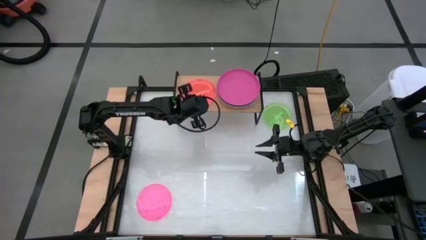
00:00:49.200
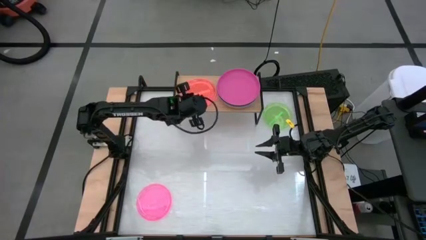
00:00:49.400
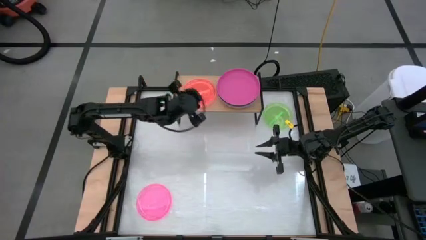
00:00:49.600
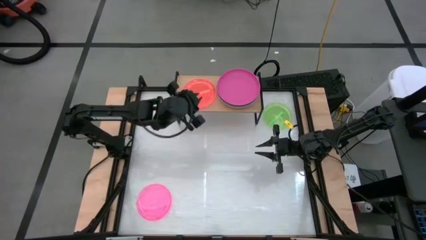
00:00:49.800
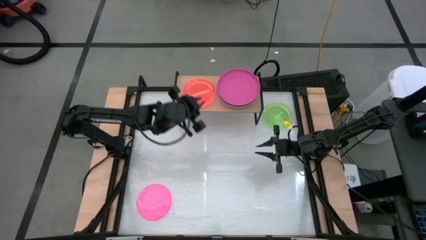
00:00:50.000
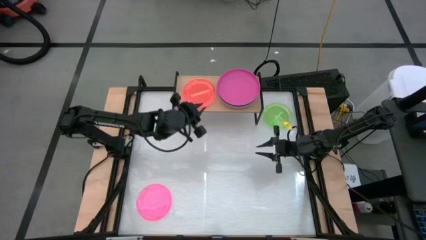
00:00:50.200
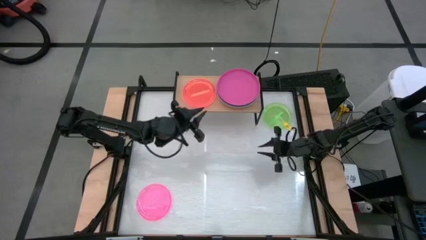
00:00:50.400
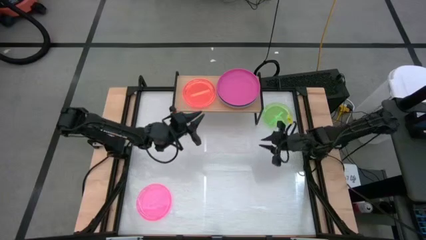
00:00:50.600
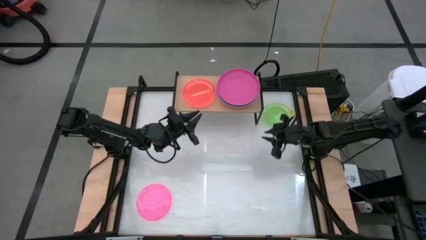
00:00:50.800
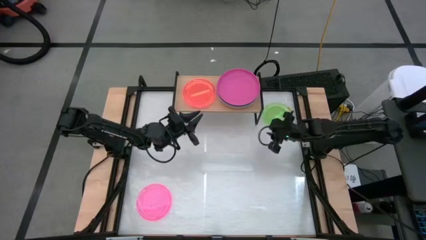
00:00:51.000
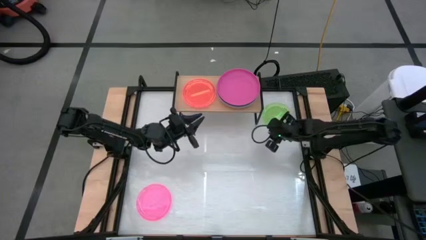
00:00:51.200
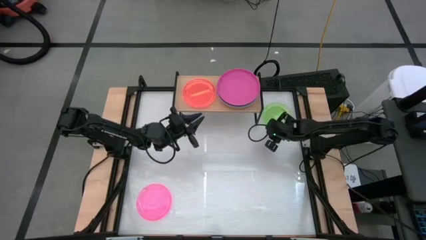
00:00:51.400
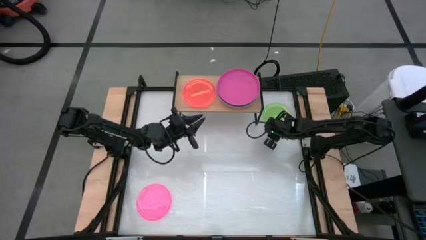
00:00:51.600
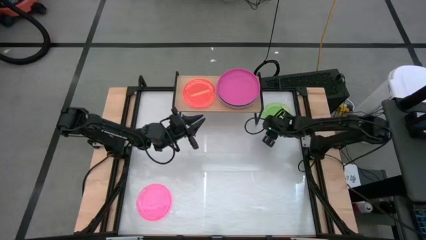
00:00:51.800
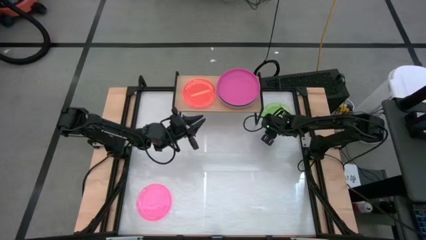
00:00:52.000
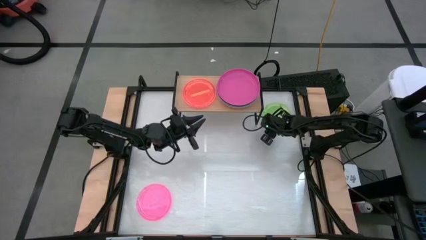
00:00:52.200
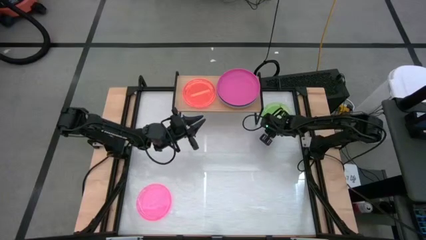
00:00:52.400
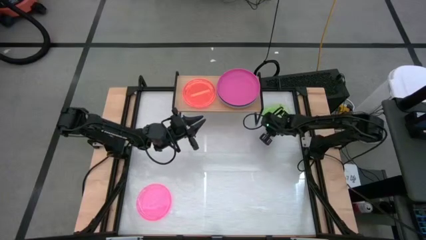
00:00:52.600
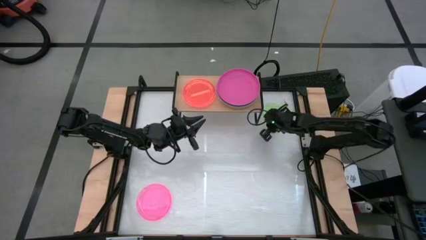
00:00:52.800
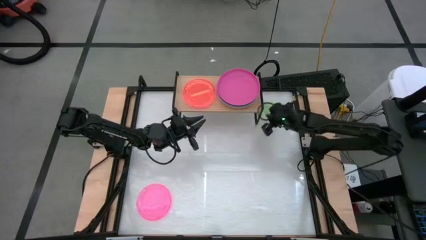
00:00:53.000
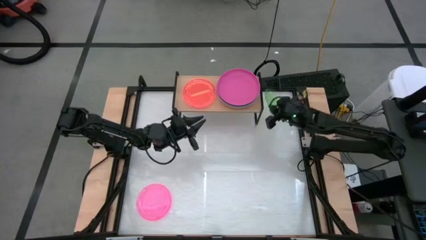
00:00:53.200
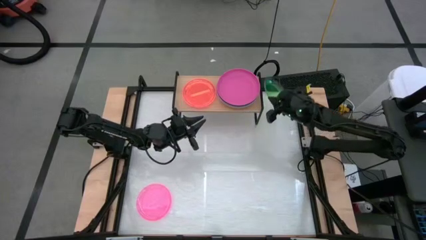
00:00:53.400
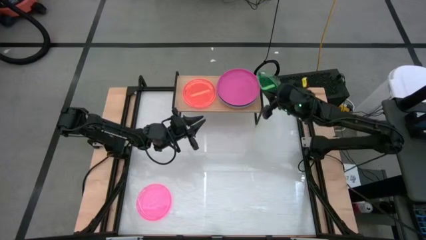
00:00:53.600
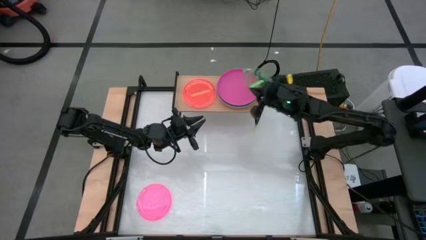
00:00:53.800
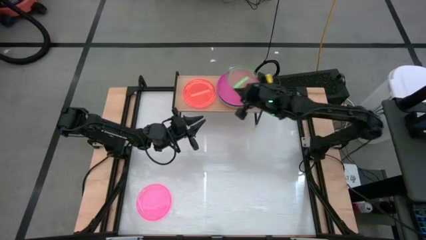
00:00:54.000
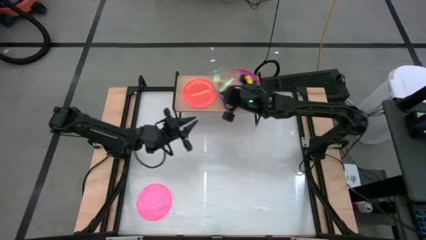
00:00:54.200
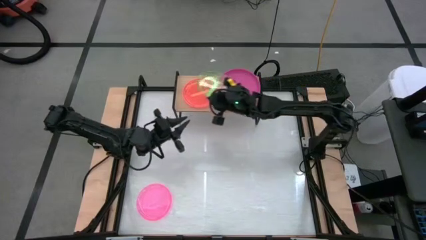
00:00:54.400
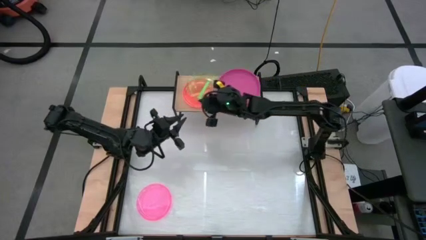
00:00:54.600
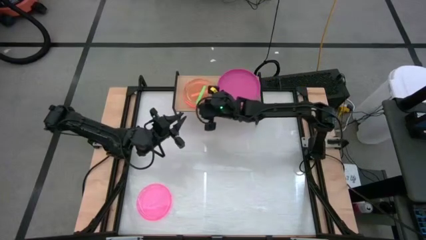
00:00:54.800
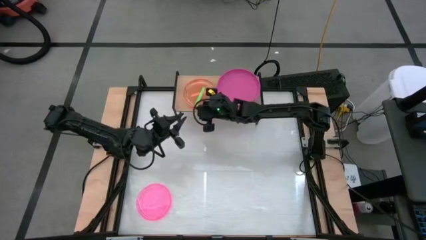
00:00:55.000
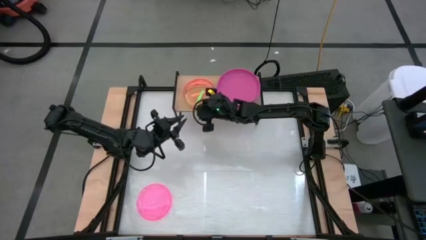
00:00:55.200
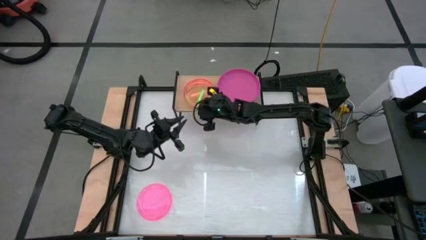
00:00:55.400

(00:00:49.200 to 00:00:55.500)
Task: Place and stack plates onto a shelf
Stack the small green plate on top of the small orange plate on the shelf

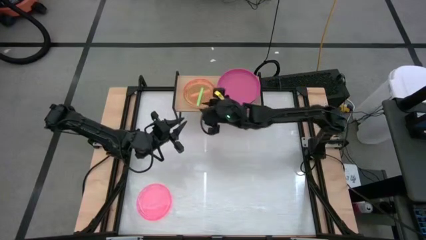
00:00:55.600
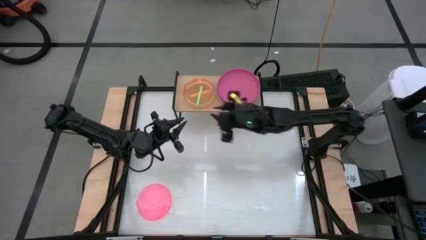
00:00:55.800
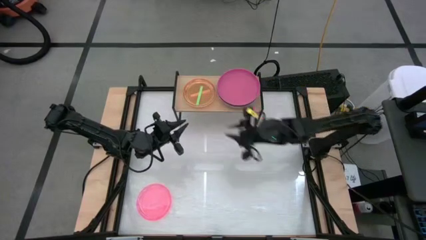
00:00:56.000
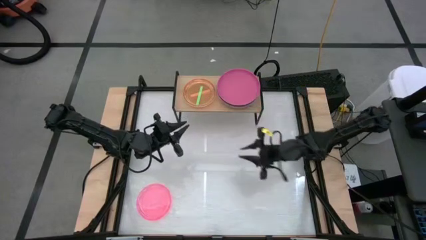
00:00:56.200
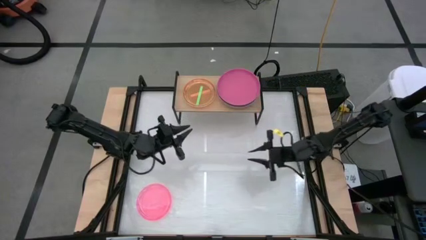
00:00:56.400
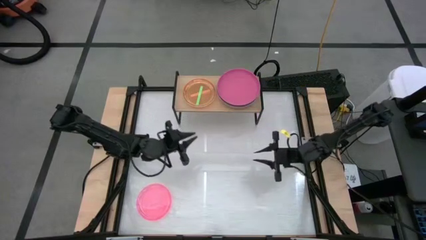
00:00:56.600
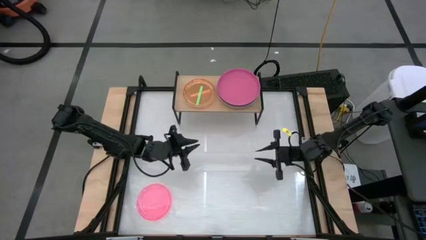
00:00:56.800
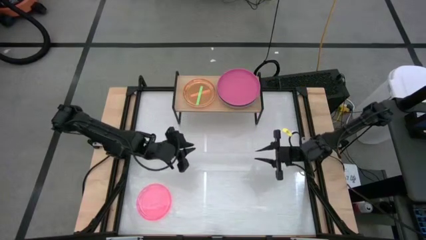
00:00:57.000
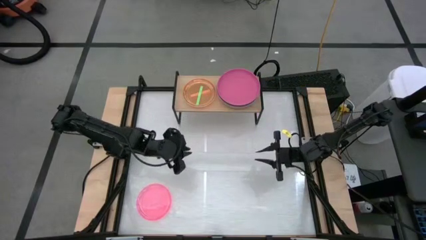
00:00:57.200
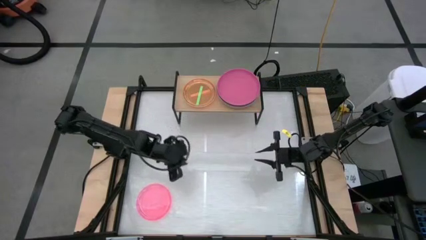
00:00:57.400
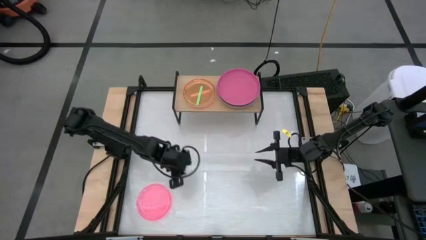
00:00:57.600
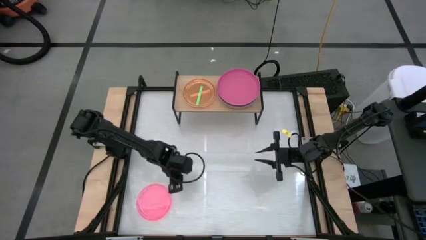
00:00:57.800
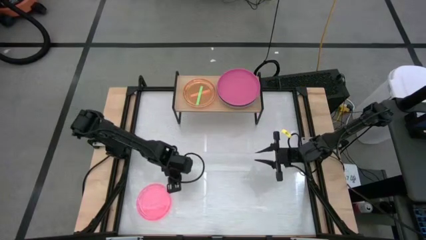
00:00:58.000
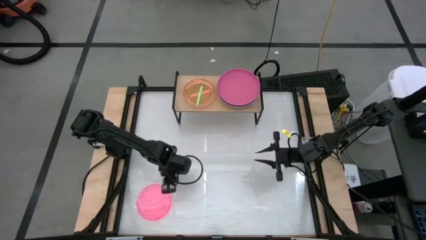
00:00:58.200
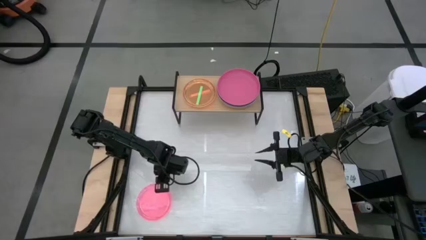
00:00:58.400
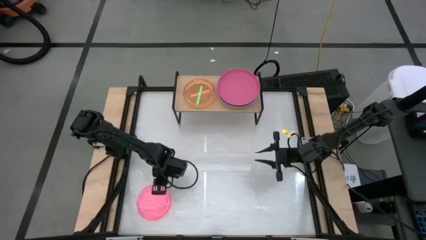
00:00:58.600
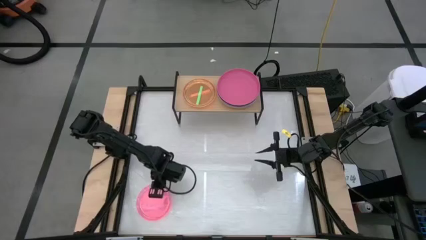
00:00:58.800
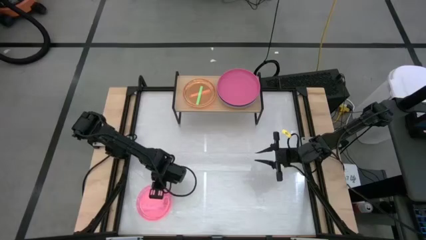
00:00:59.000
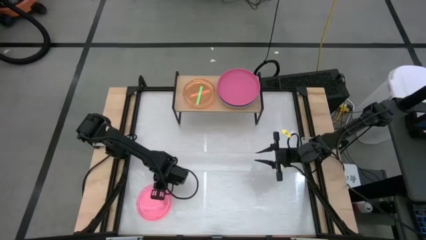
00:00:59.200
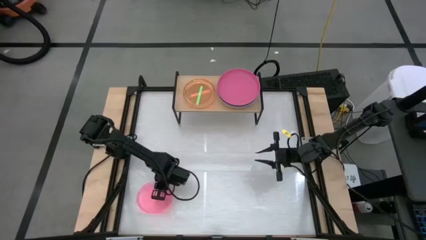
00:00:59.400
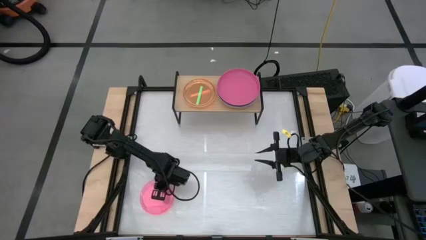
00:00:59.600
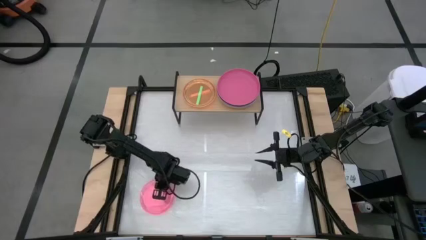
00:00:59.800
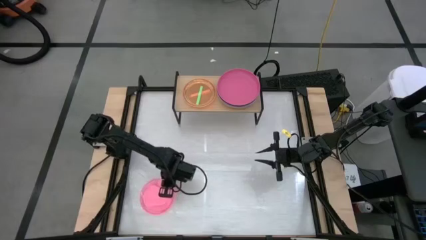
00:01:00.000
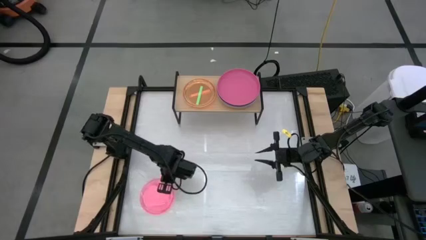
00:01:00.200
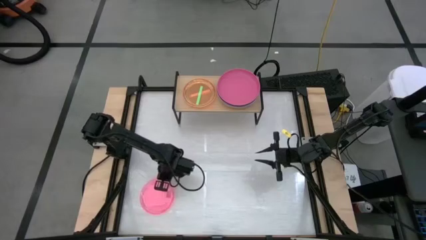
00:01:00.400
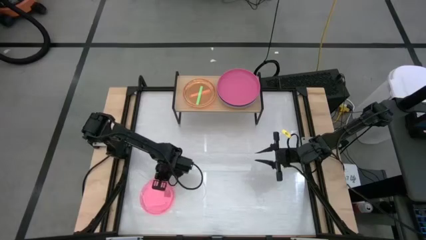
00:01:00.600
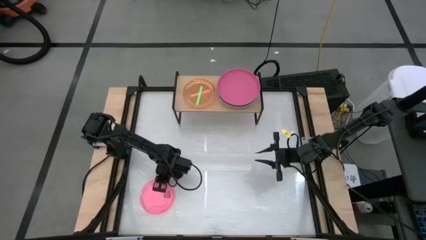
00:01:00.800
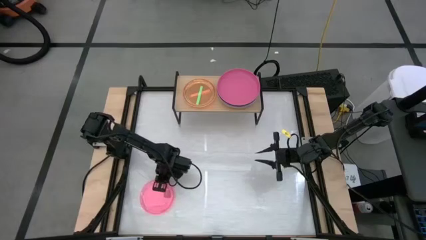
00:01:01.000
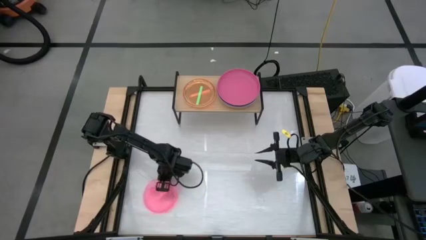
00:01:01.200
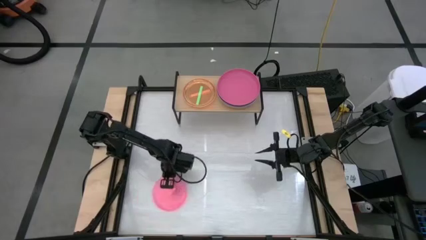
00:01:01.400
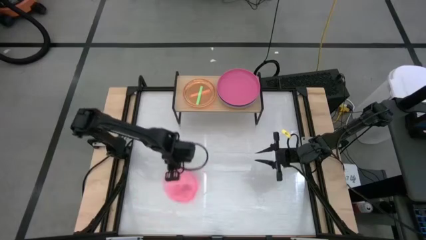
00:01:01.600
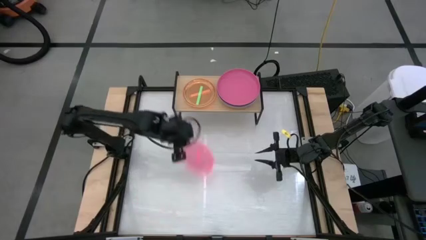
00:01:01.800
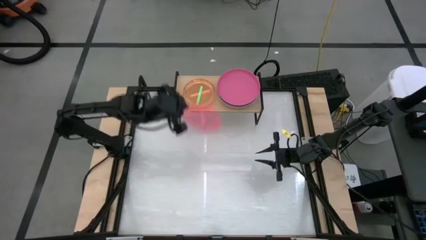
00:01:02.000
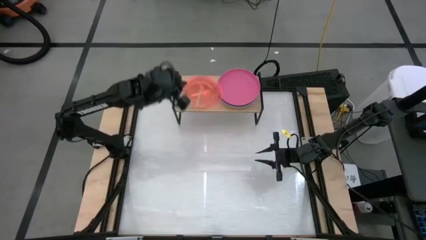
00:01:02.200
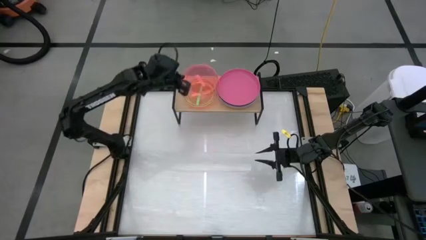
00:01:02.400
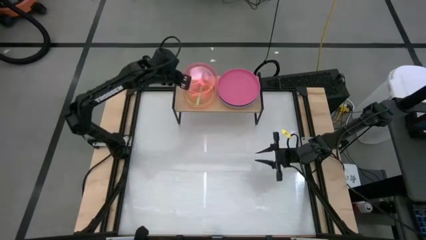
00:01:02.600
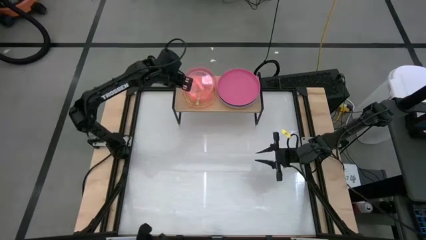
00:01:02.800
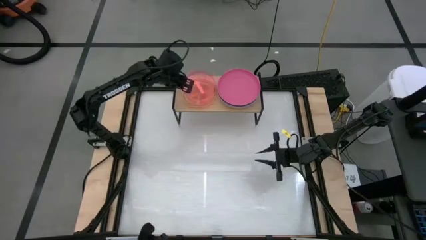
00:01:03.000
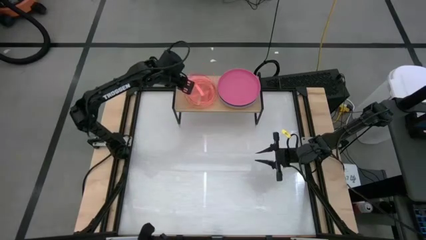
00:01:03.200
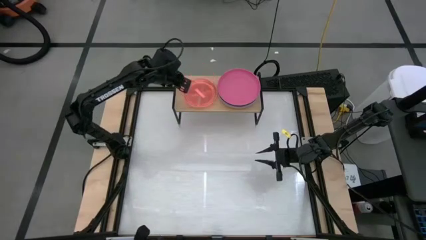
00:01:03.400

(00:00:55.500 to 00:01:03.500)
Stack the small pink plate on top of the small pink plate on the shelf

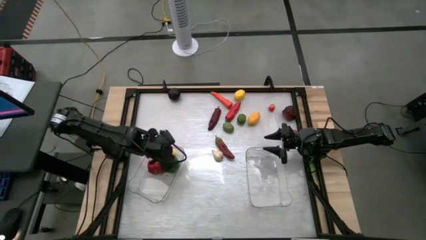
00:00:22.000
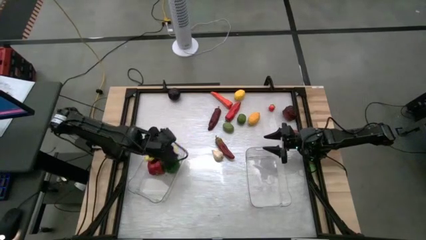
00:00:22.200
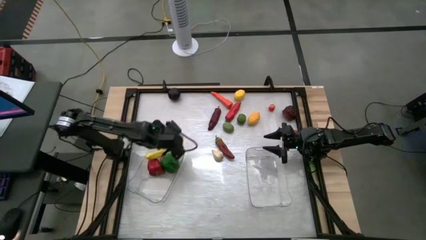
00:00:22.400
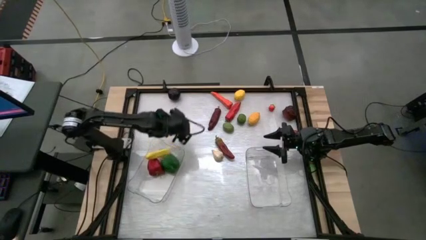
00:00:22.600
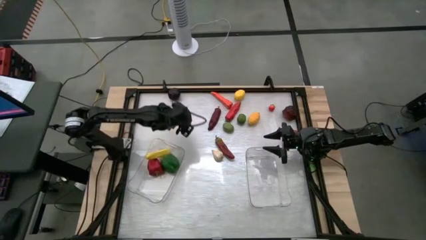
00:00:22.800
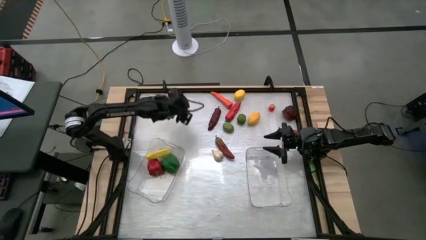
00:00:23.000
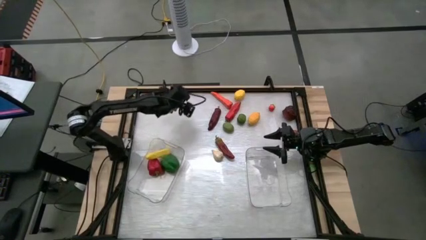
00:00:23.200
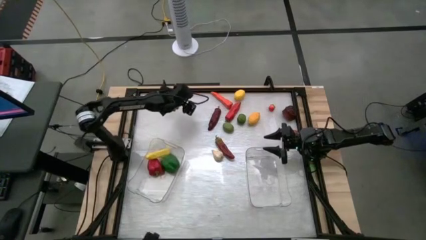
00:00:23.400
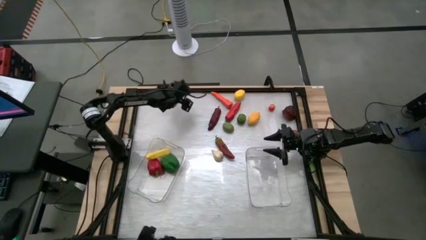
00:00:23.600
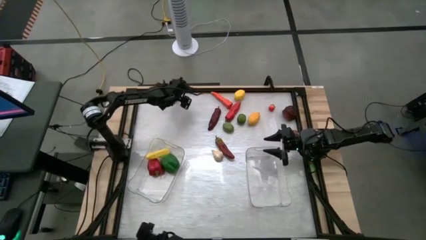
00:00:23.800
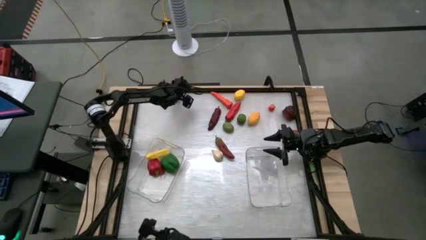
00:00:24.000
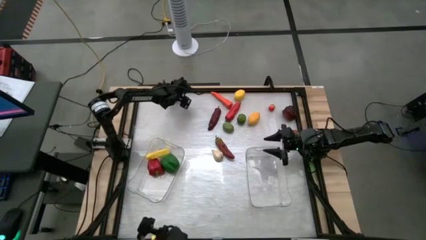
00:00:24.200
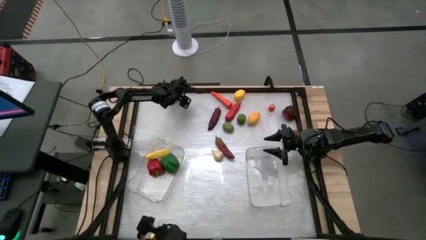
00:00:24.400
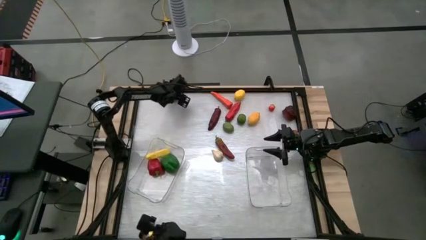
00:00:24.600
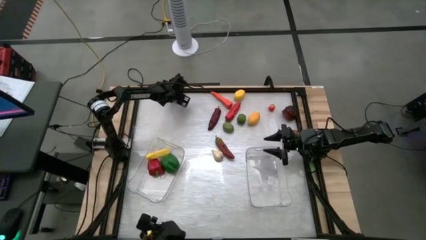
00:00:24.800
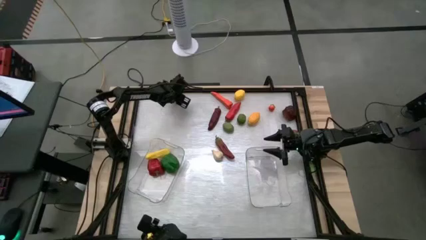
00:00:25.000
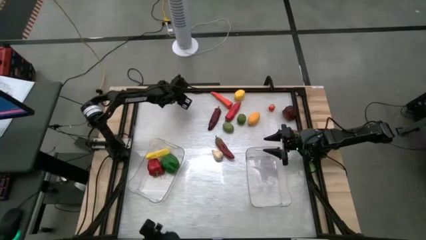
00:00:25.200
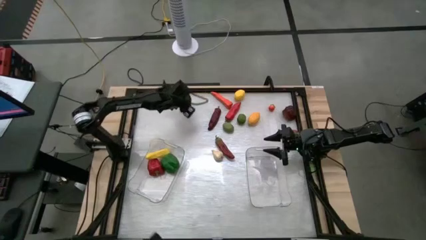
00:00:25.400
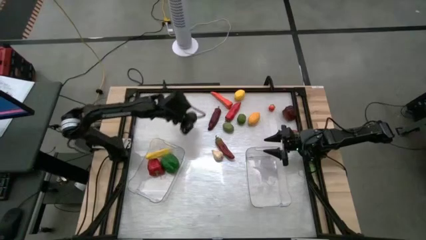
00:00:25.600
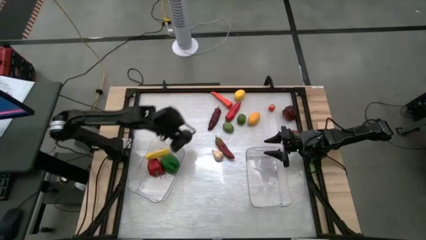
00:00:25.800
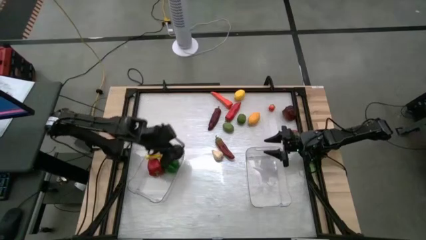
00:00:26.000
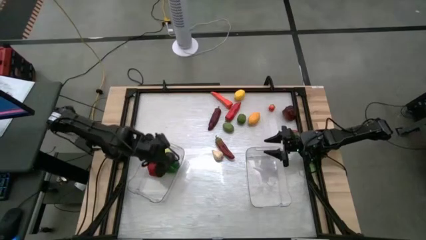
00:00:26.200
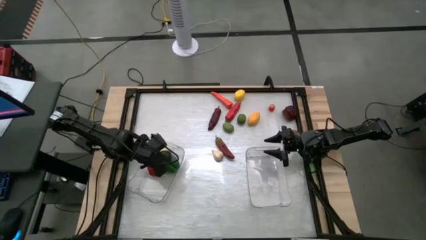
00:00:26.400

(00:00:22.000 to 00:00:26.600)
Task: Sort produce into baskets
Put the purple plum into the left transparent bin
